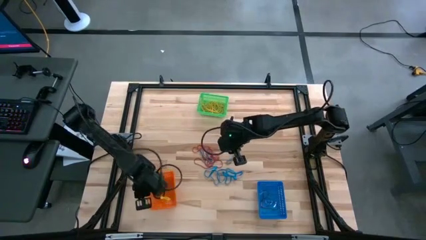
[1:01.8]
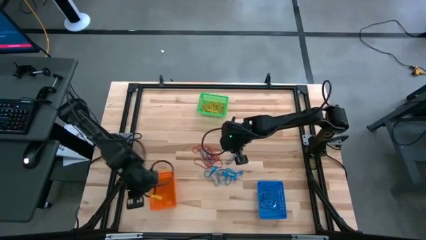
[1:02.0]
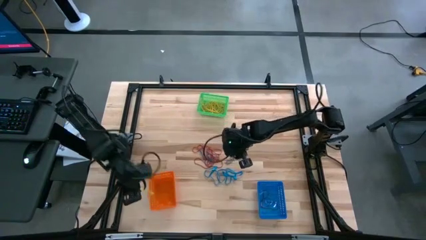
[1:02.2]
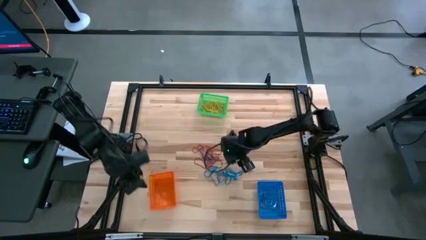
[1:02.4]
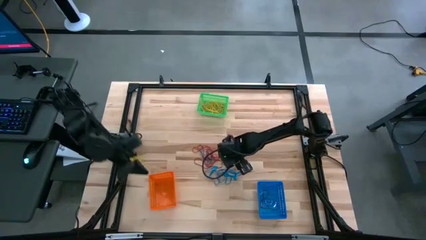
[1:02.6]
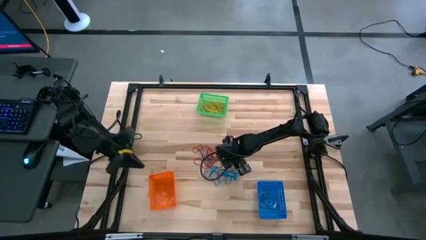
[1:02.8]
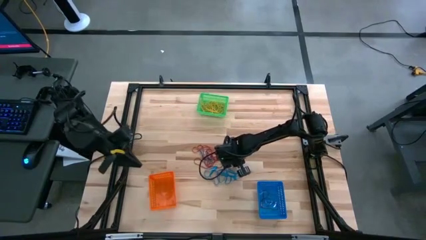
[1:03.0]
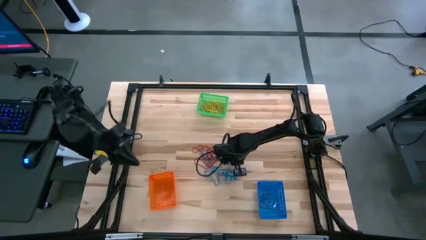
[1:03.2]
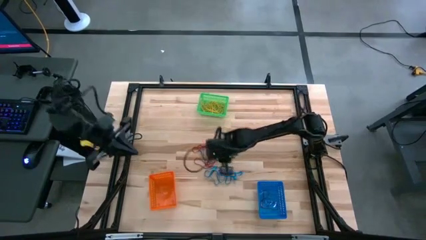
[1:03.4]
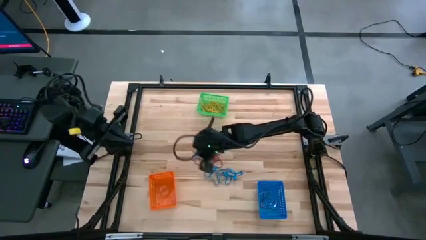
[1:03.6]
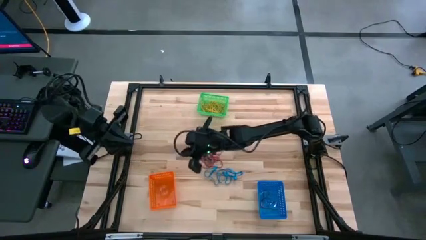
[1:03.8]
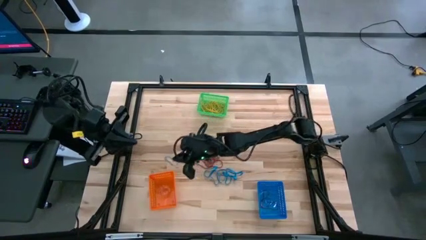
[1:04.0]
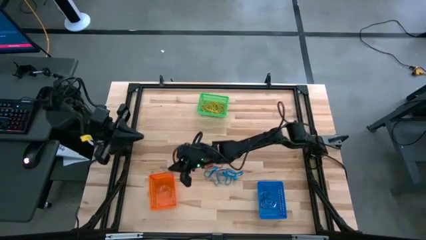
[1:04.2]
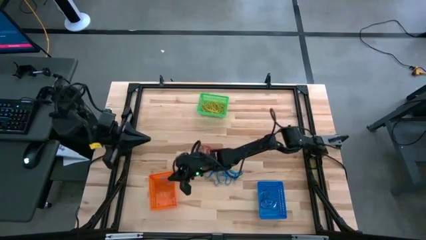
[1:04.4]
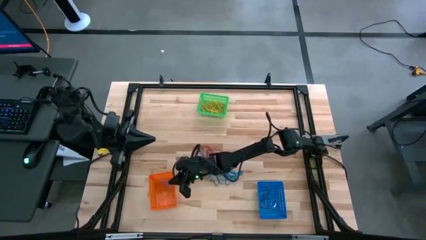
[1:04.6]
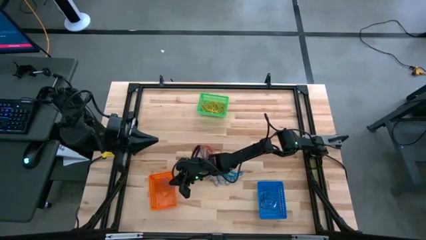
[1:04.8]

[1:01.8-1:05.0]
Task: Sort rubber bands into baskets
Put the blue rubber band into the orange bin

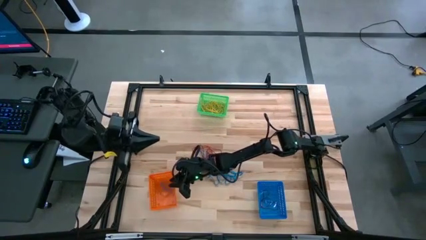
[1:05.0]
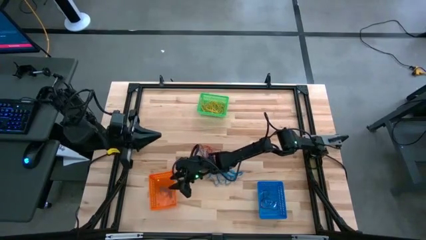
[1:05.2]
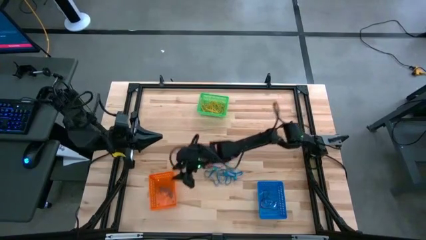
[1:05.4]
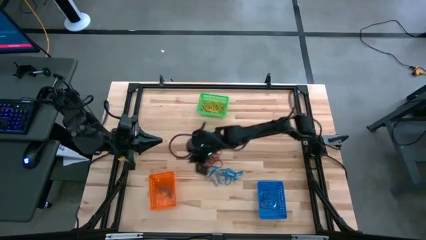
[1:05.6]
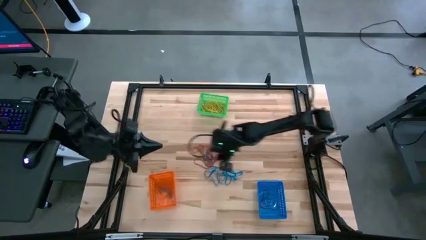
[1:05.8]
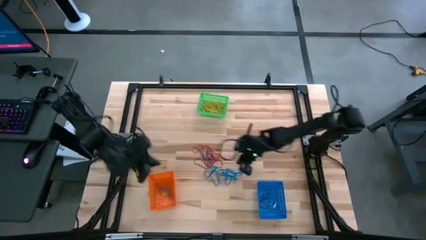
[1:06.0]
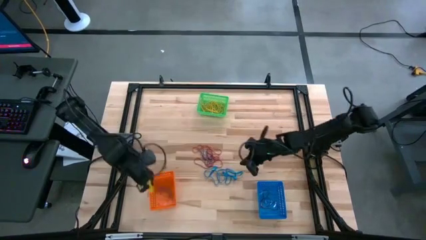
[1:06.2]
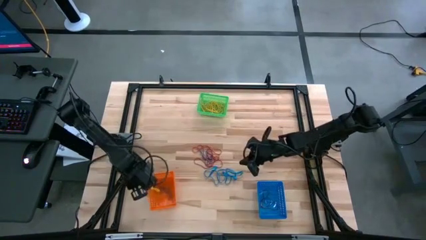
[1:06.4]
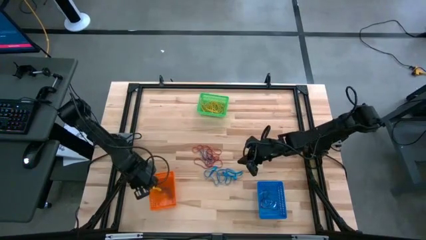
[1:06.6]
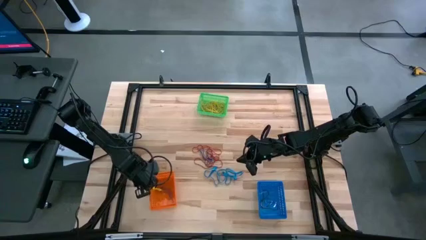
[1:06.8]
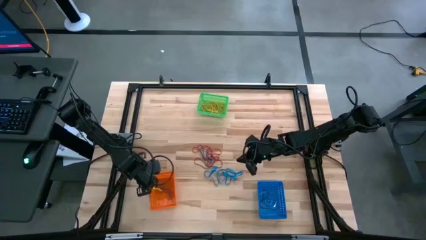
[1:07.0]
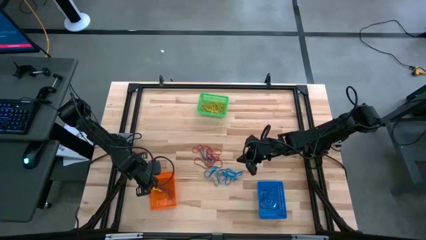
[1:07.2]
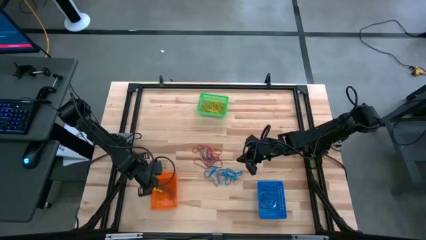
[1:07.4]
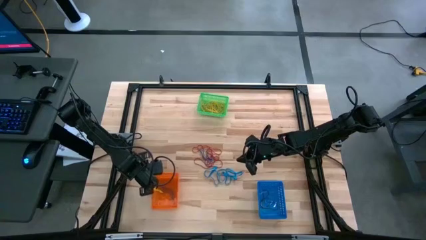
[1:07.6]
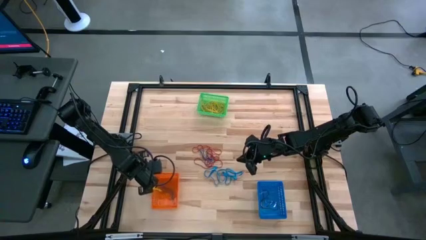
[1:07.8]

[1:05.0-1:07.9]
Adjust the orange bin on the table

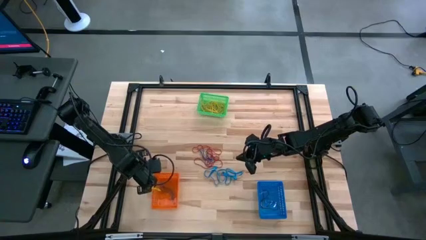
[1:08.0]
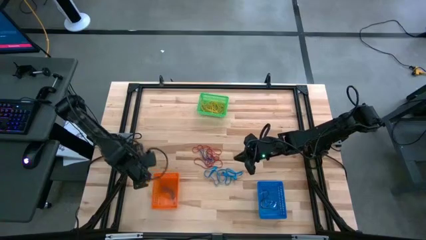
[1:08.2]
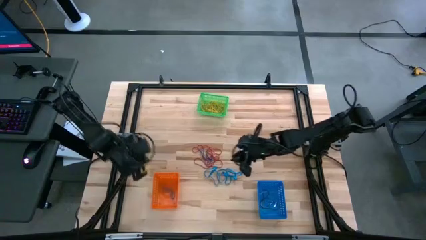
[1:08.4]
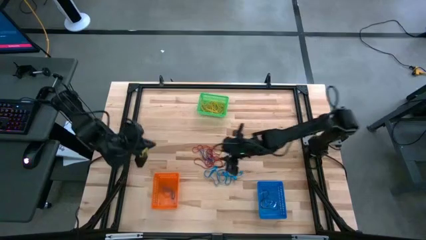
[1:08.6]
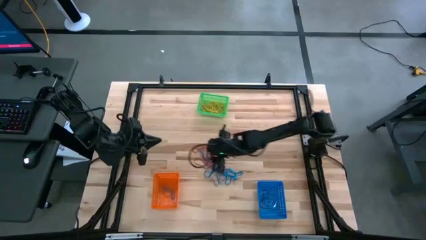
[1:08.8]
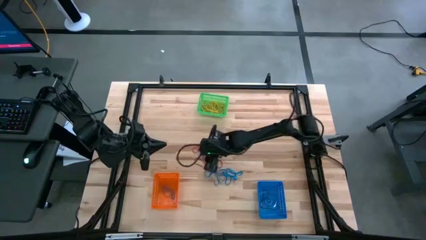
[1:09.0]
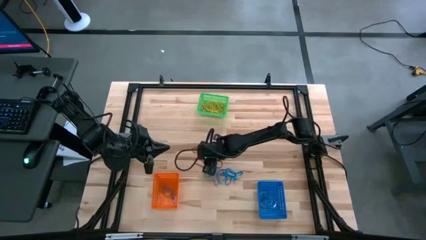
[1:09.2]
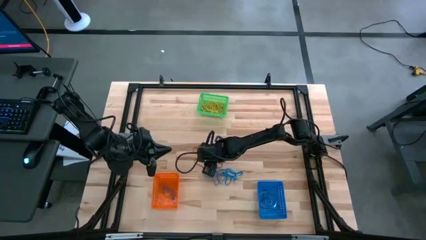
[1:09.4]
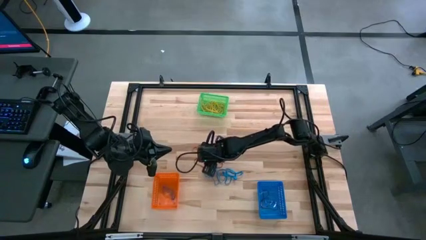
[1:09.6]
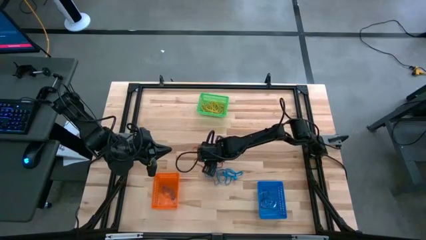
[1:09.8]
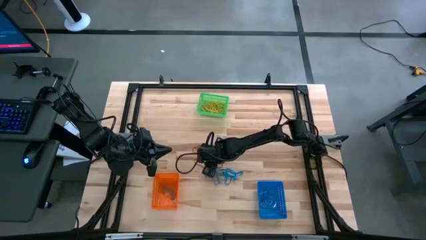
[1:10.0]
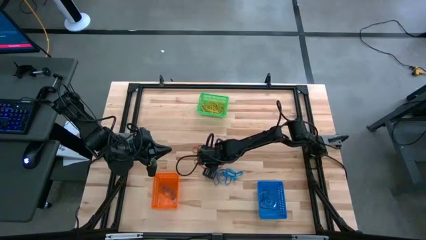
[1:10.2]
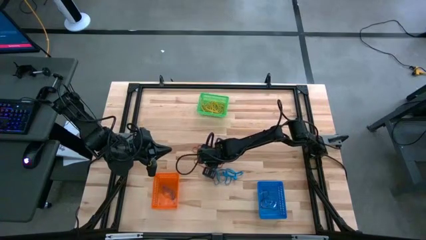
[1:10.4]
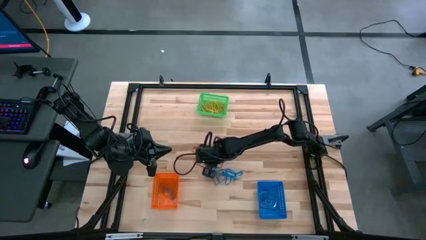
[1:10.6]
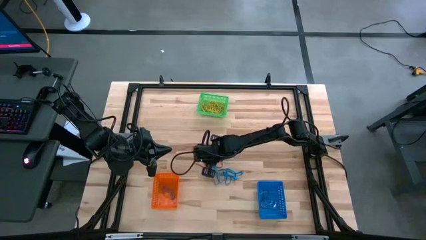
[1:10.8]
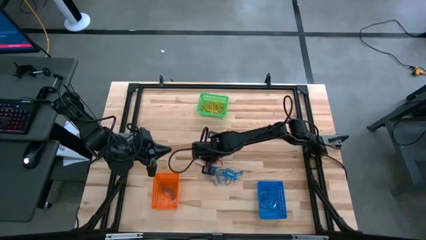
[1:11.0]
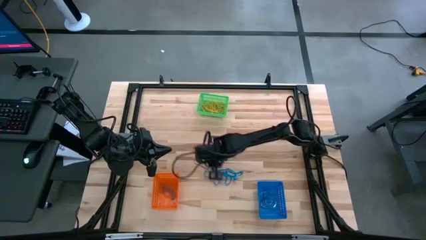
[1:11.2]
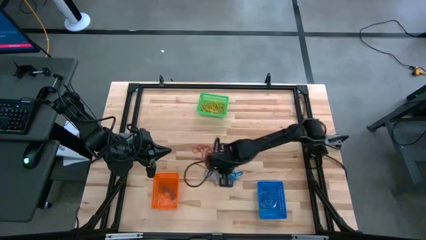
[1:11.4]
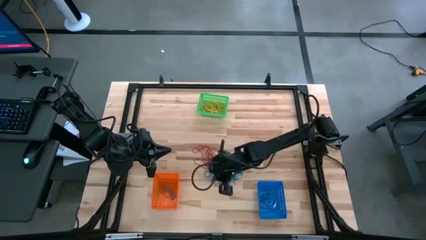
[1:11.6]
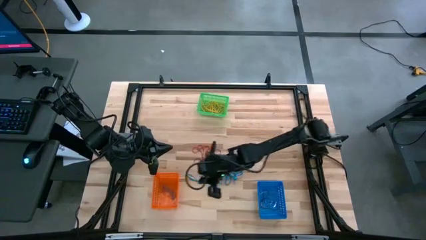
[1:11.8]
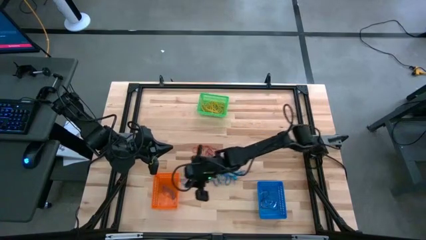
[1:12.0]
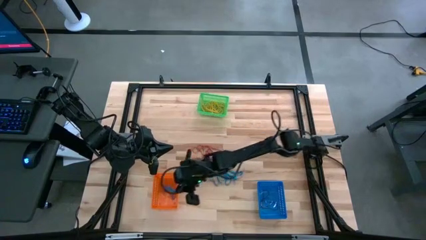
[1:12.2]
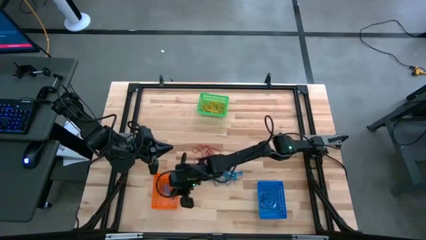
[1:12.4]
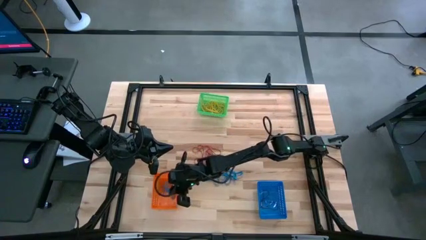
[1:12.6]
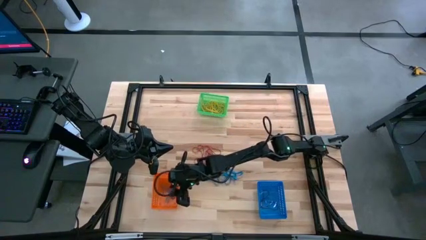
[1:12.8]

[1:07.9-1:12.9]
Put the blue rubber band into the orange bin

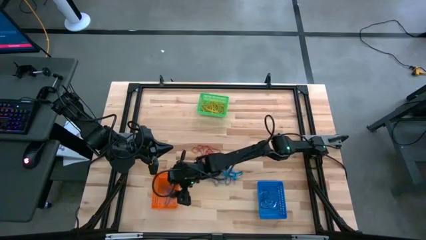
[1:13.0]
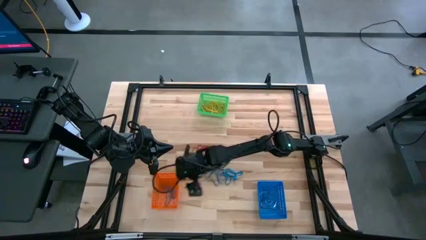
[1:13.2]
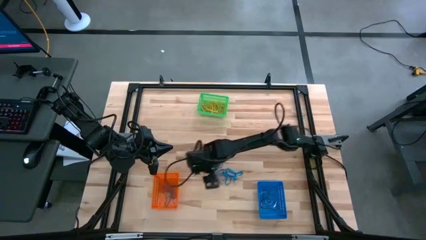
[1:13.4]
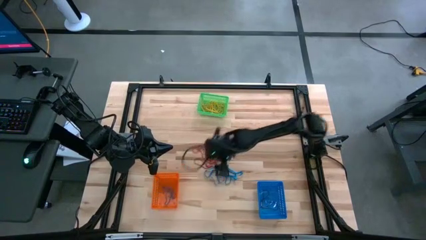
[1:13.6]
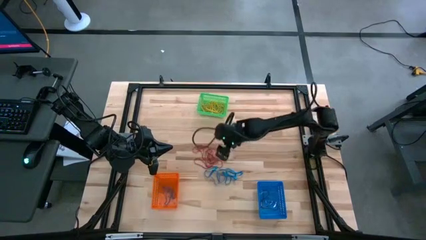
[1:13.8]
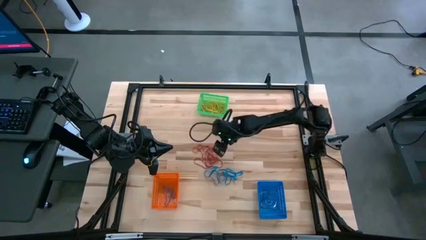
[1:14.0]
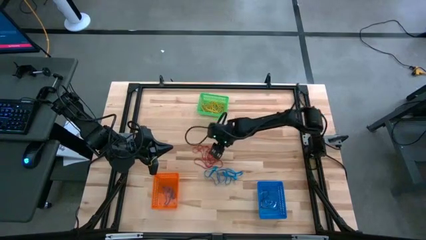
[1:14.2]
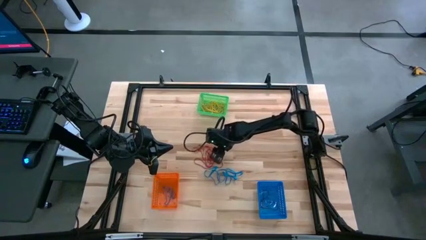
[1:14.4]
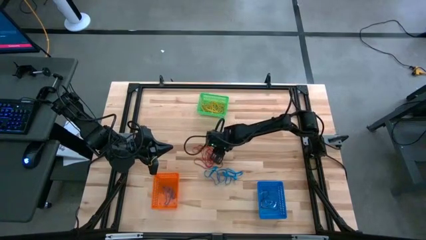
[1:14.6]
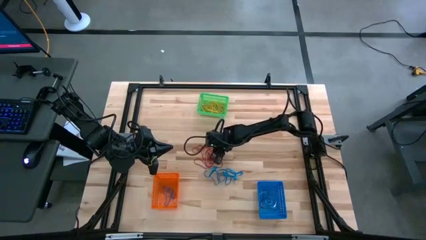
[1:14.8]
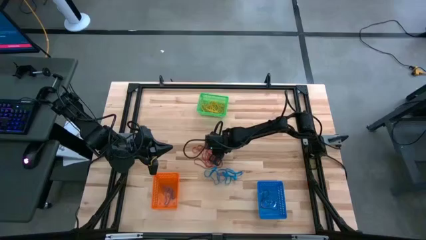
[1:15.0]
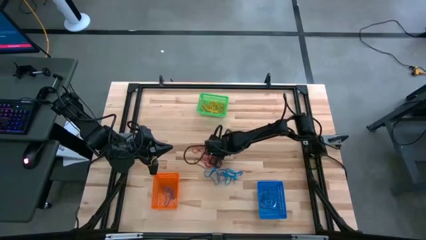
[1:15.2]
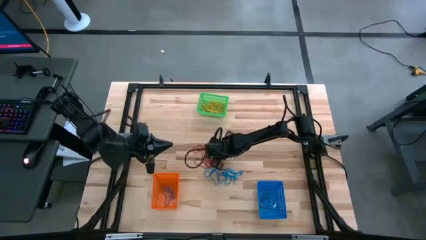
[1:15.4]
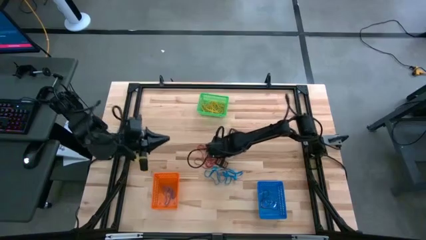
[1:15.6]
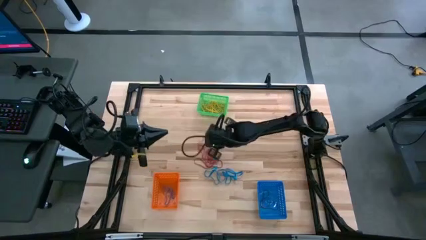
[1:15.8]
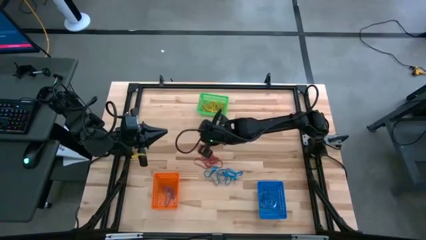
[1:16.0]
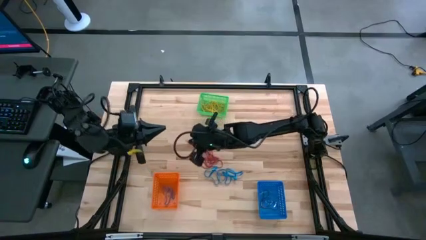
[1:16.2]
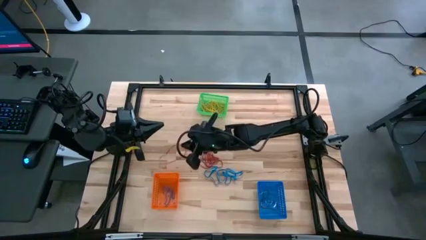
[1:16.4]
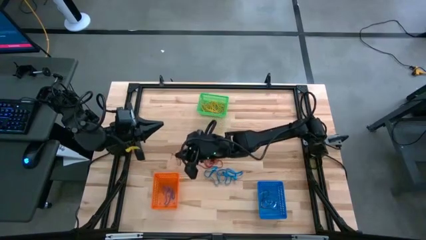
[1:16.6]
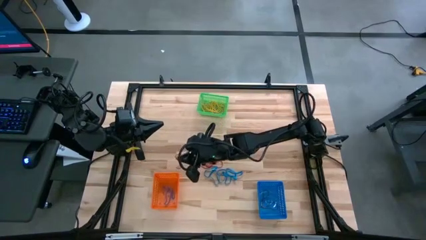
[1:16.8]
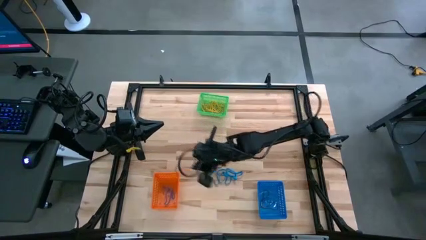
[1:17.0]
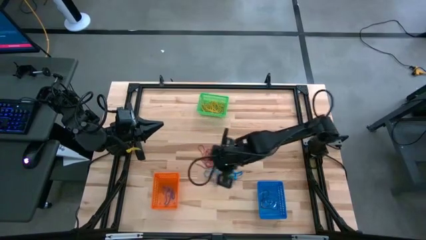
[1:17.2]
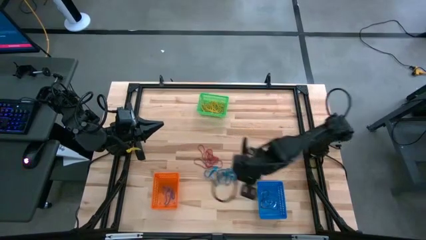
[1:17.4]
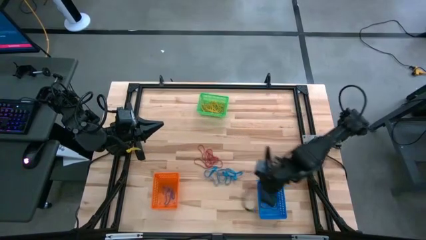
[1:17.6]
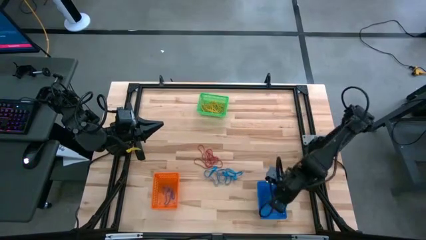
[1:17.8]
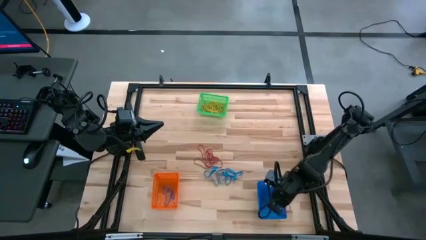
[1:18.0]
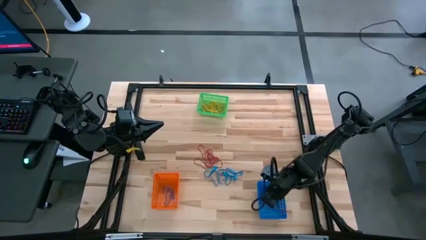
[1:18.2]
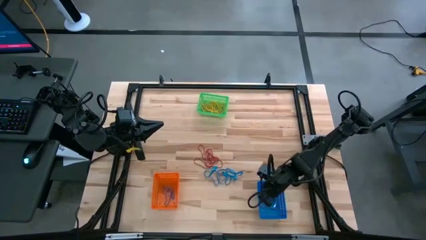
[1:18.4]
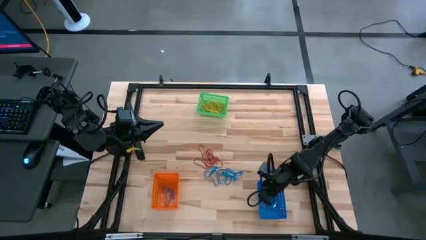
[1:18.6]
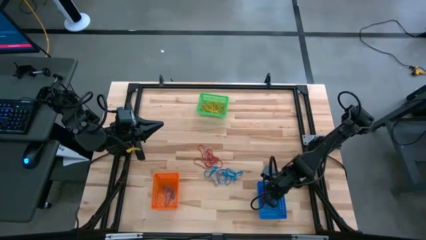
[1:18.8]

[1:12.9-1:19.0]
Put the red rubber band into the blue bin
